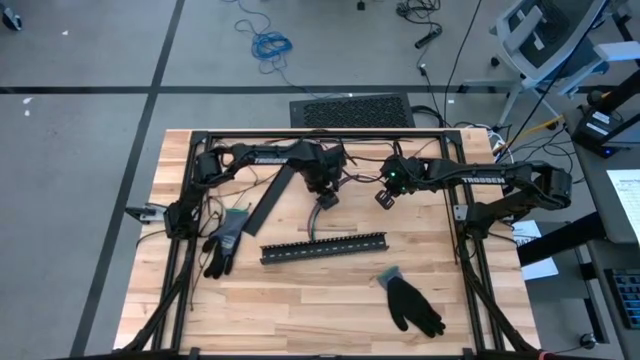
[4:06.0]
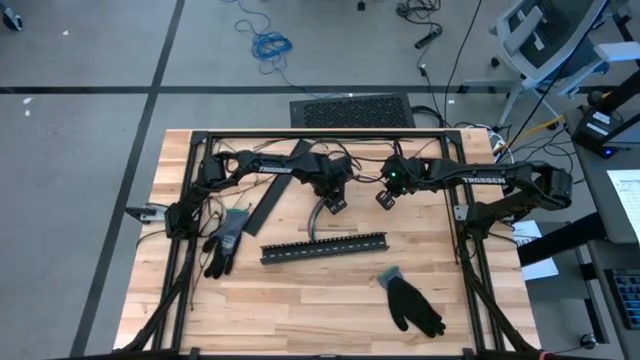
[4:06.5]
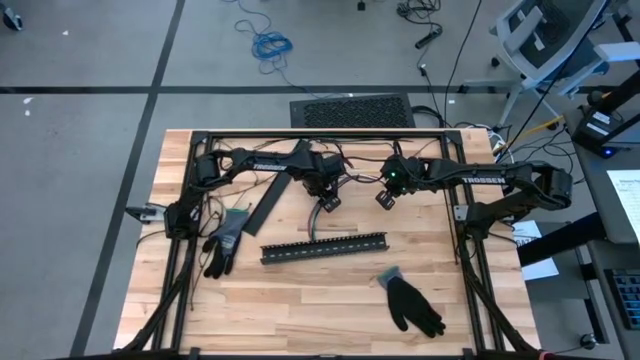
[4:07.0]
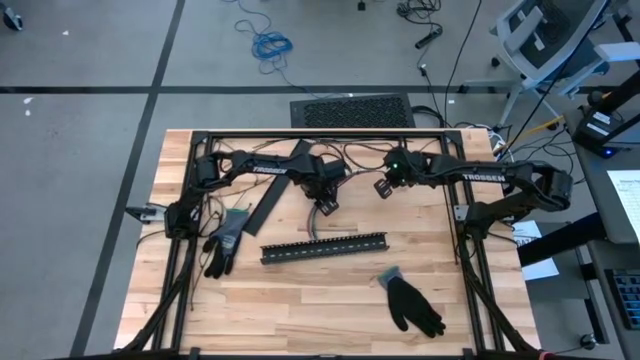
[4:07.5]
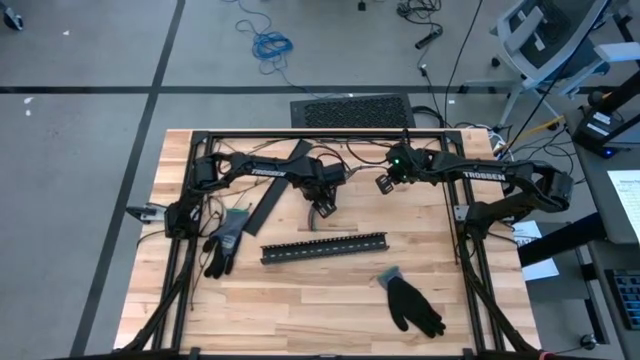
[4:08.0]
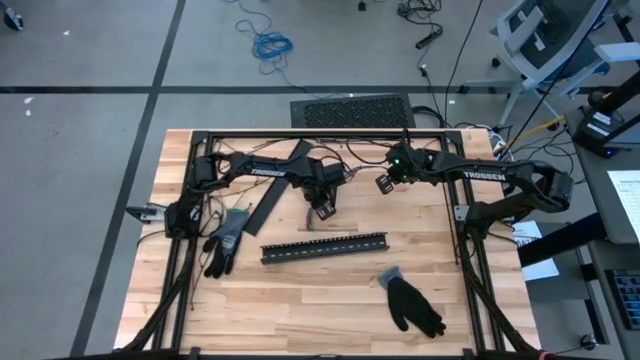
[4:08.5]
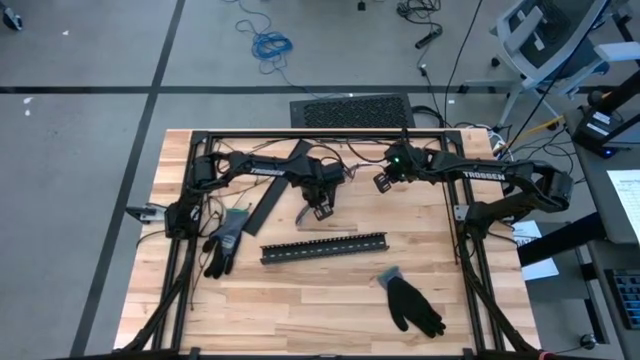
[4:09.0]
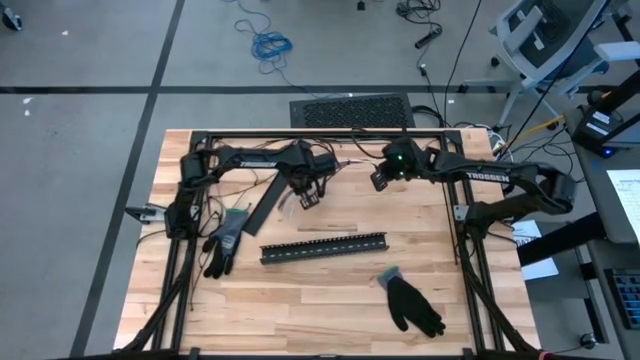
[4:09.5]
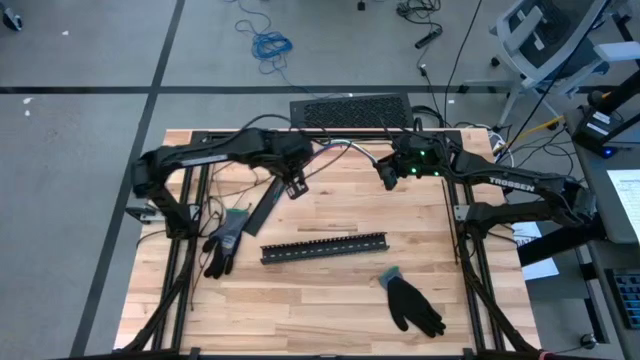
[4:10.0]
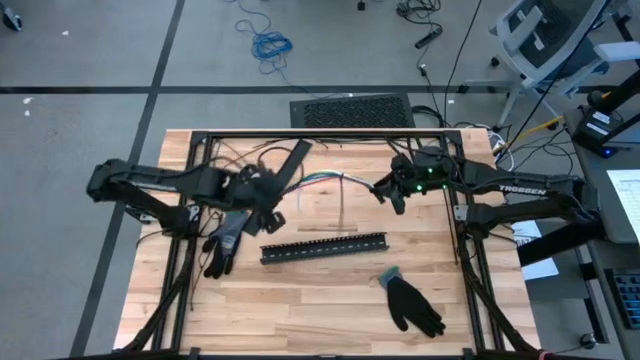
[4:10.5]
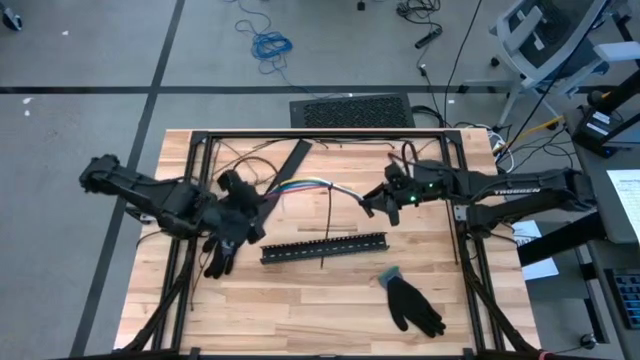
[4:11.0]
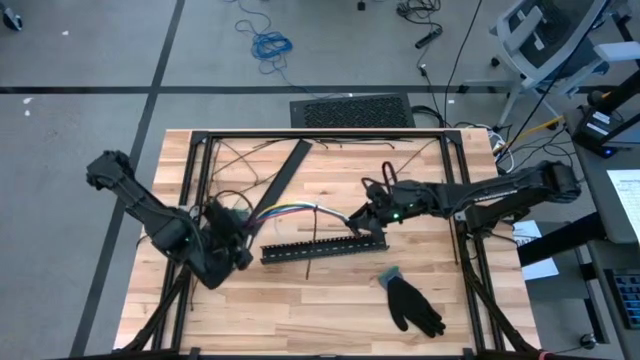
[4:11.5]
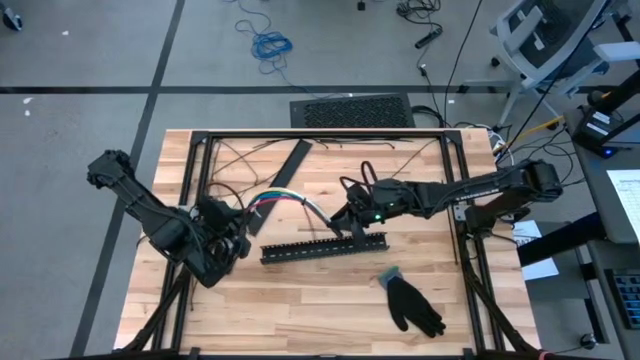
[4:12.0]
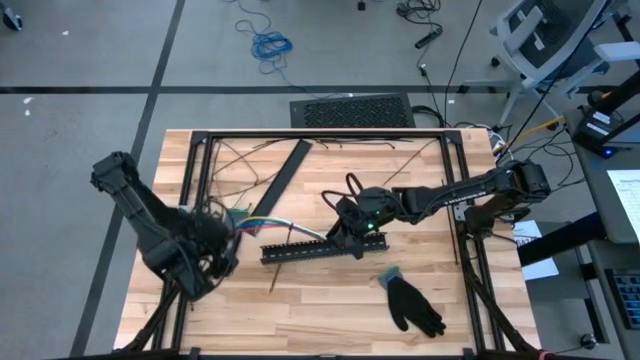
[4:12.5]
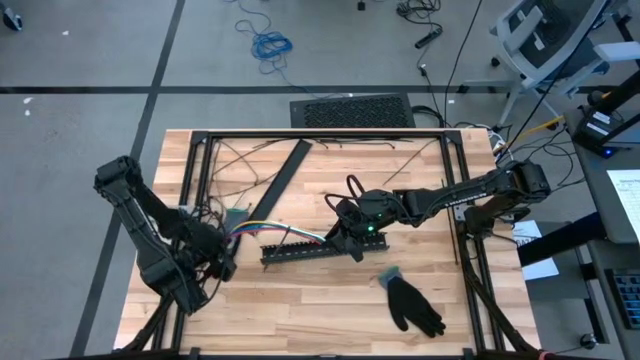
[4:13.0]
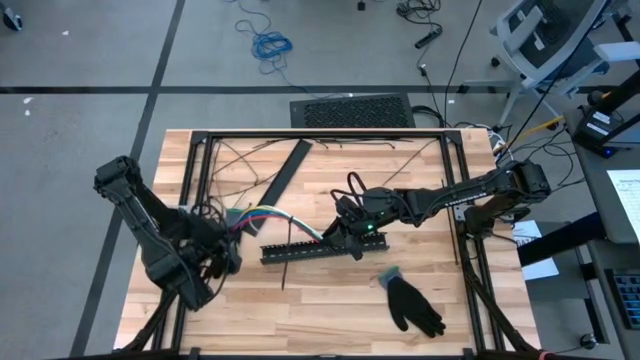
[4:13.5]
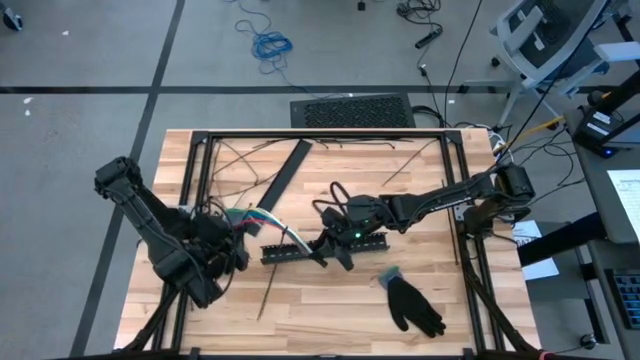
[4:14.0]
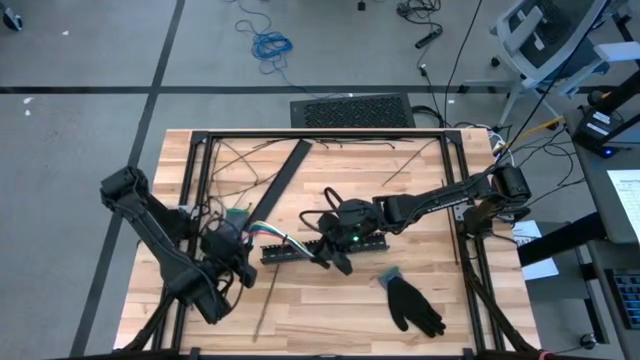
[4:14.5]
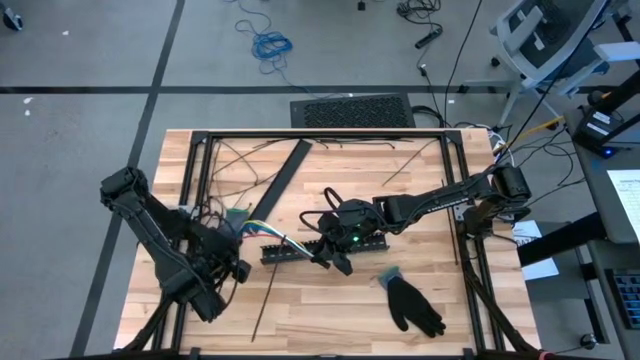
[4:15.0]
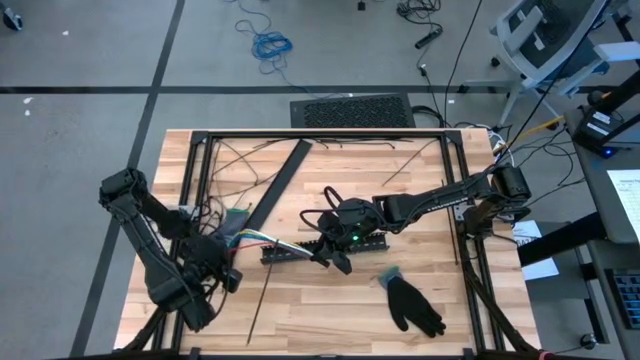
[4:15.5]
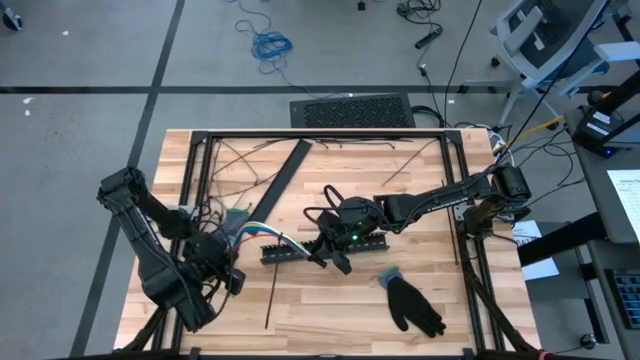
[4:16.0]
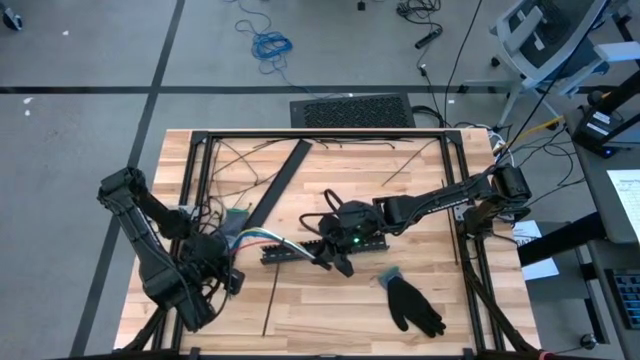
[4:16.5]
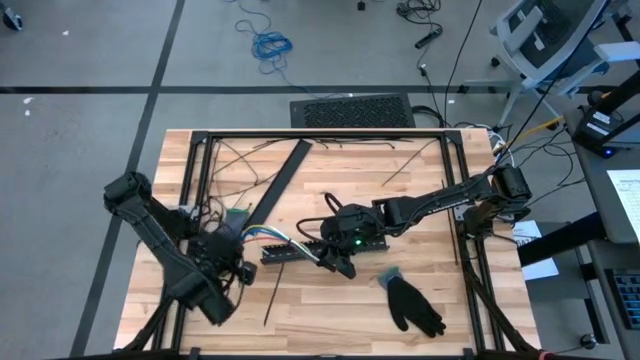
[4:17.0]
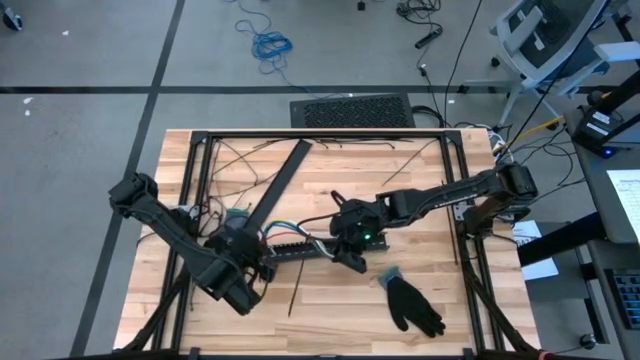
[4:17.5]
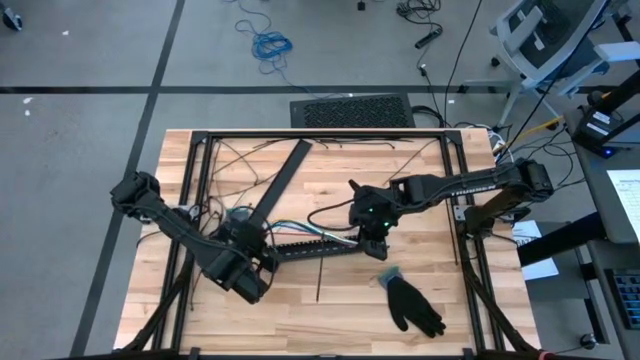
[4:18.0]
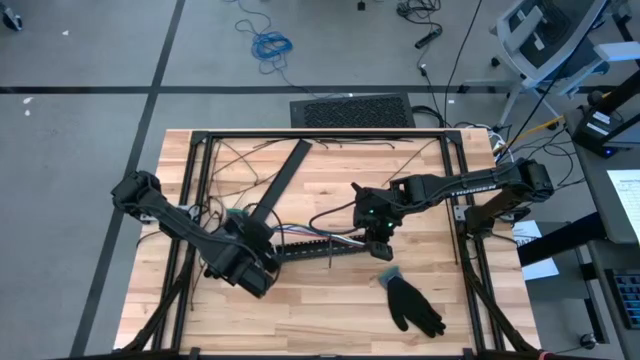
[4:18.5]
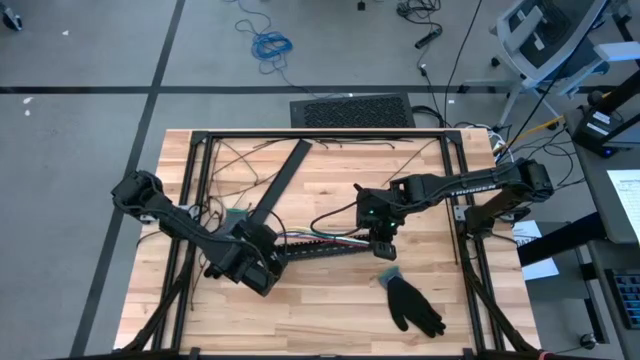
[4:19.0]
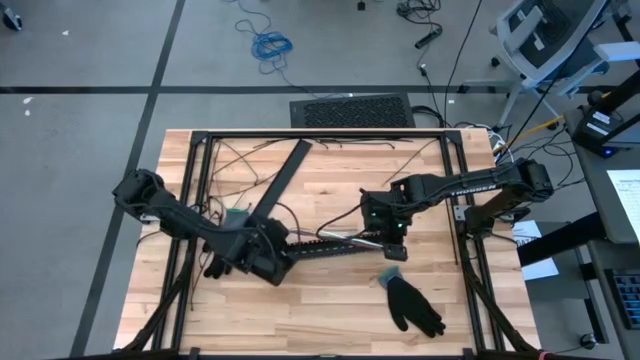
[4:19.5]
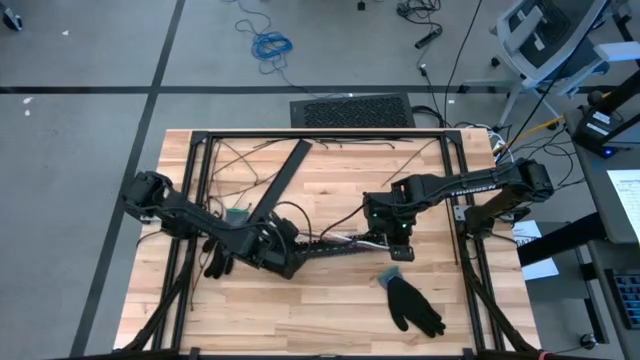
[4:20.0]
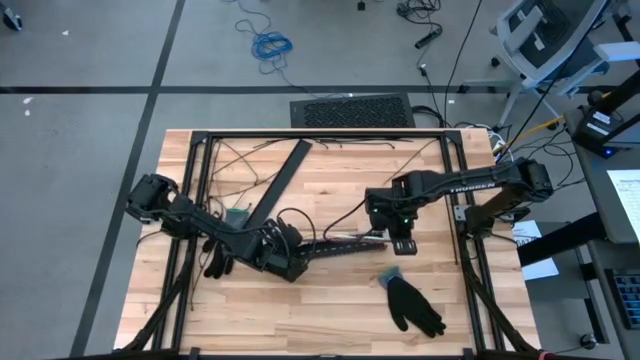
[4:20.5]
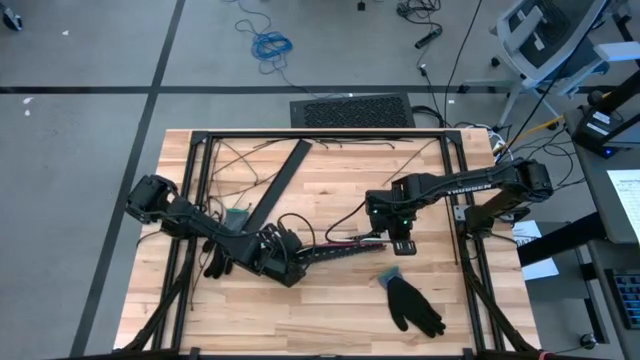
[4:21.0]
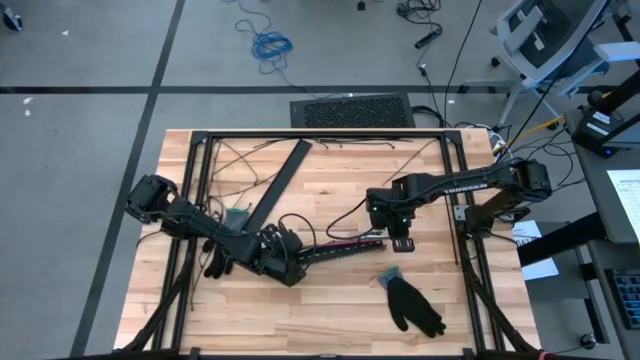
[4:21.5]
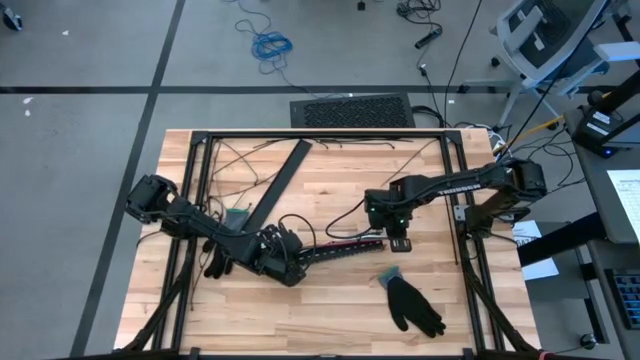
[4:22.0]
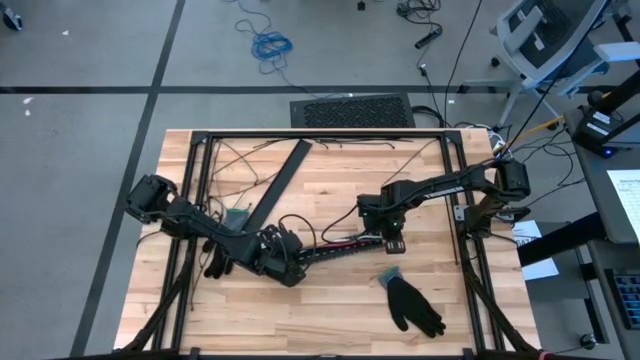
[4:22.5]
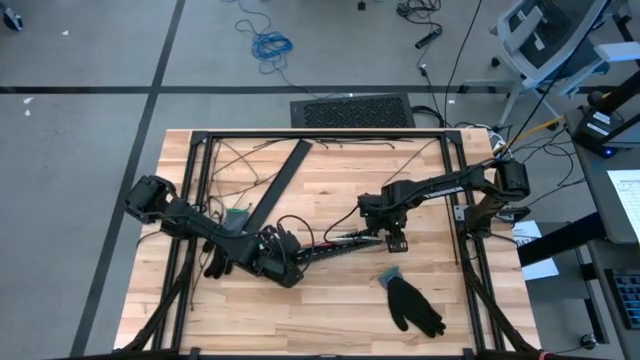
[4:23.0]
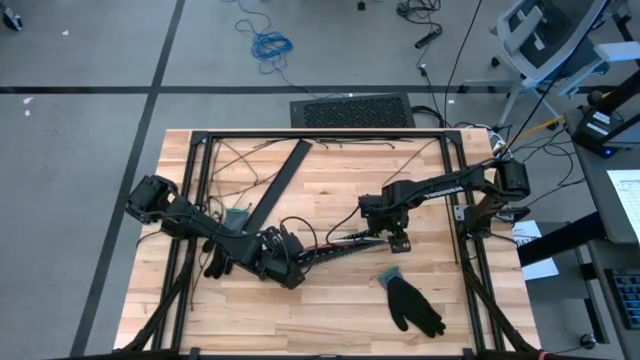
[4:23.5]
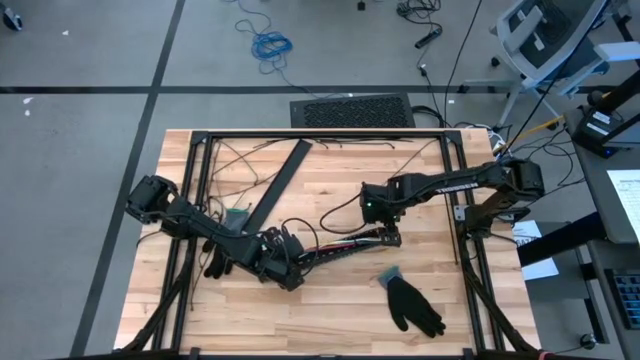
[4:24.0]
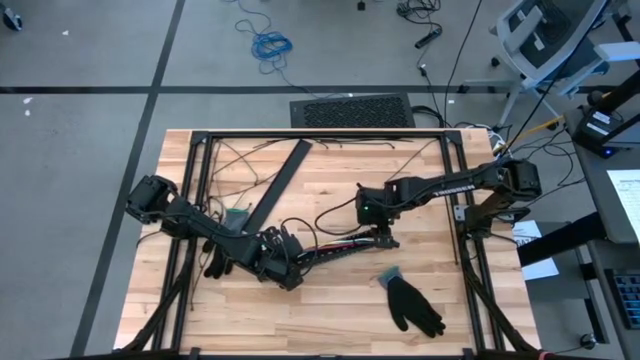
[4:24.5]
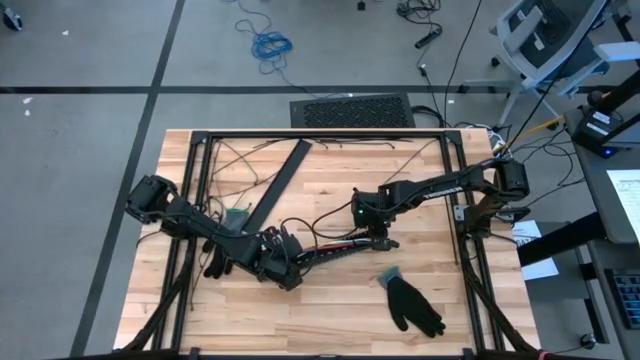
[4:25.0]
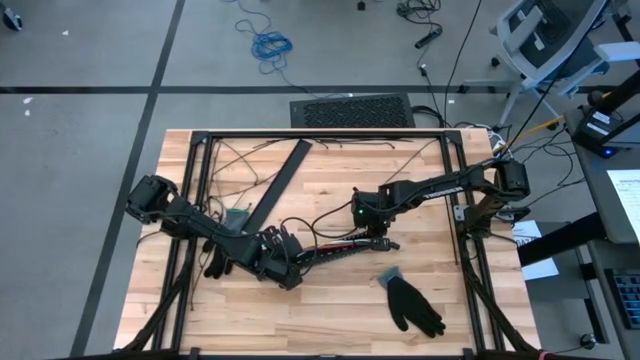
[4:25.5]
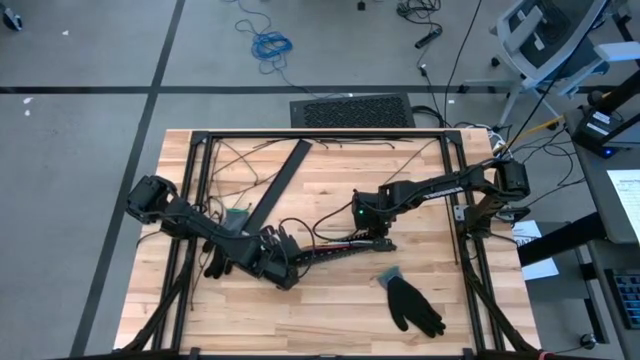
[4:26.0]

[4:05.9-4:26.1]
Task: Ziptie cables
Put the ziptied cable wires into the cable duct
